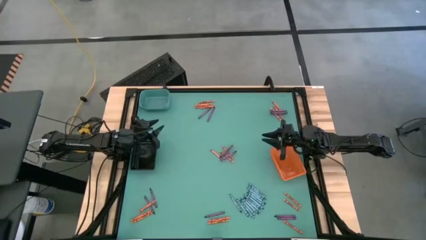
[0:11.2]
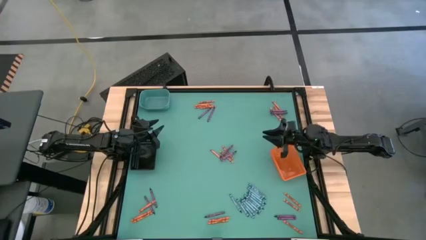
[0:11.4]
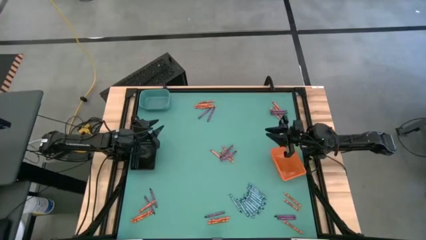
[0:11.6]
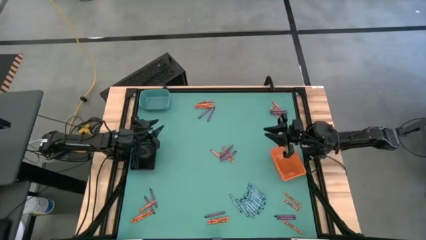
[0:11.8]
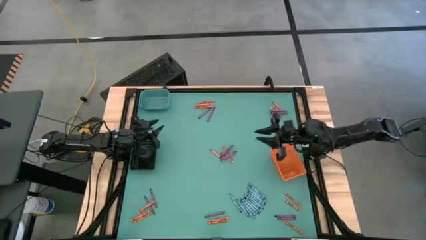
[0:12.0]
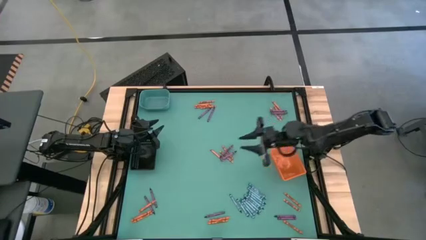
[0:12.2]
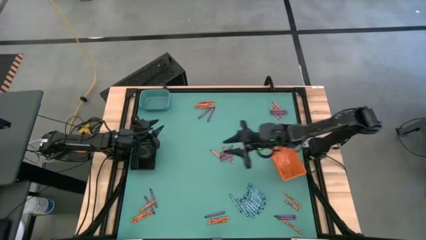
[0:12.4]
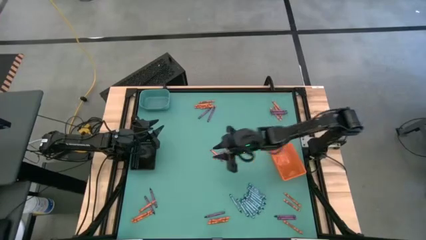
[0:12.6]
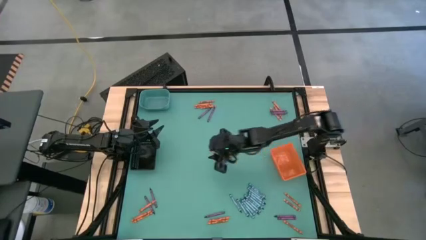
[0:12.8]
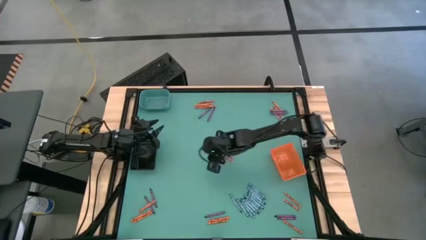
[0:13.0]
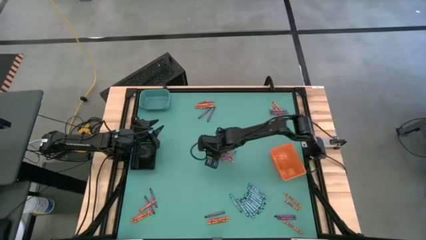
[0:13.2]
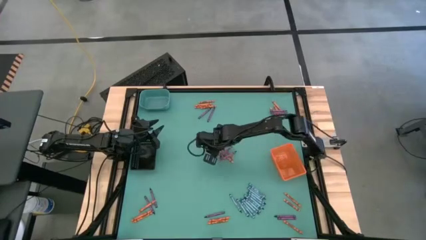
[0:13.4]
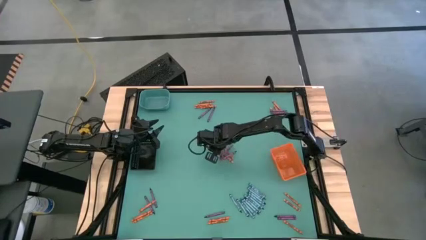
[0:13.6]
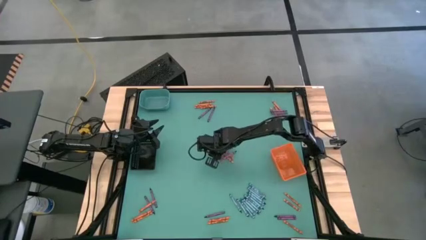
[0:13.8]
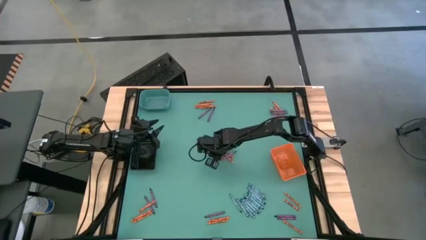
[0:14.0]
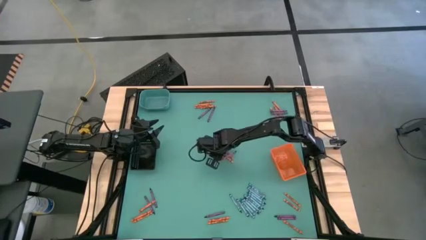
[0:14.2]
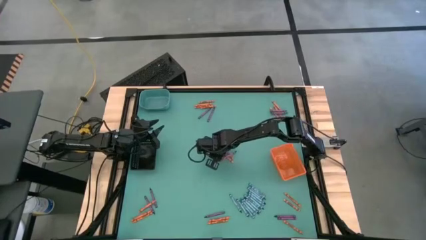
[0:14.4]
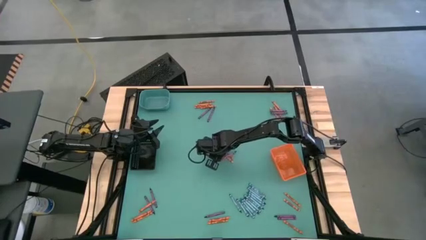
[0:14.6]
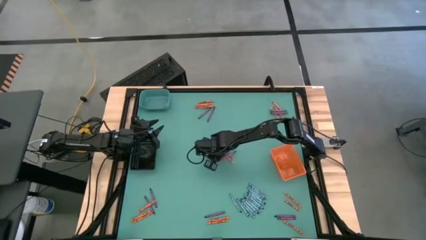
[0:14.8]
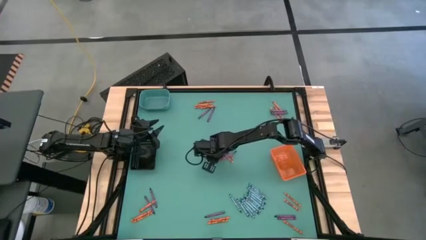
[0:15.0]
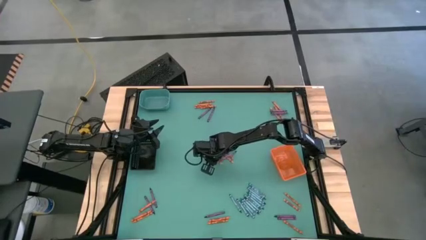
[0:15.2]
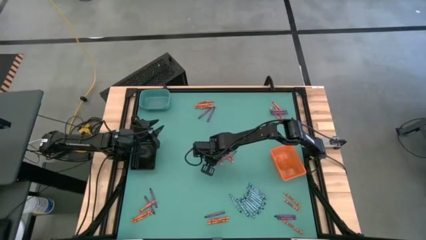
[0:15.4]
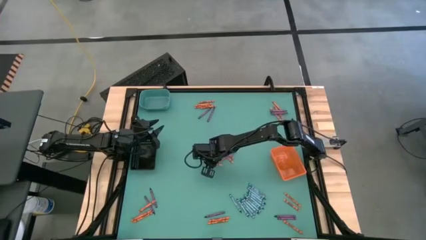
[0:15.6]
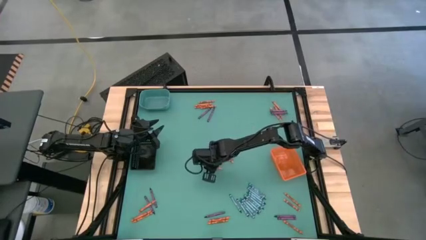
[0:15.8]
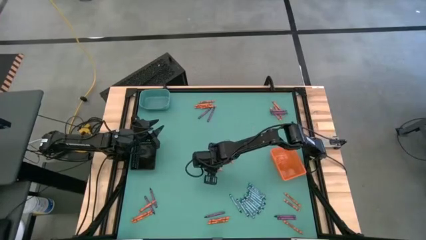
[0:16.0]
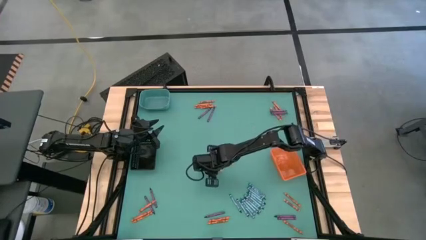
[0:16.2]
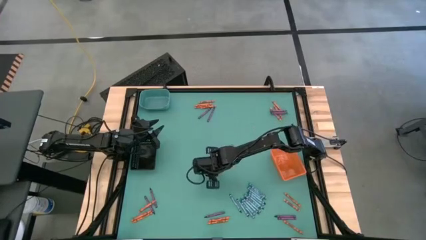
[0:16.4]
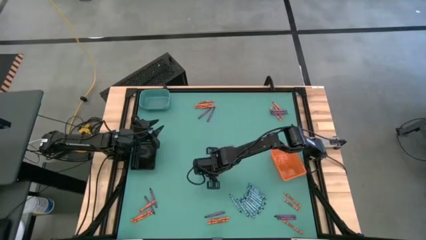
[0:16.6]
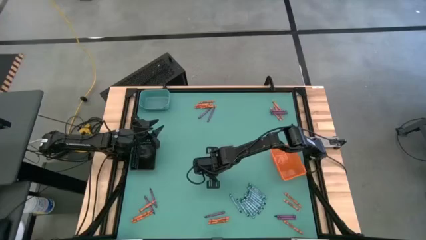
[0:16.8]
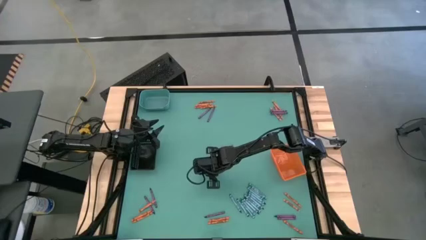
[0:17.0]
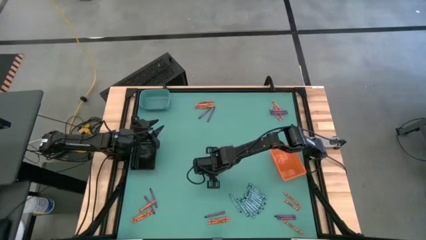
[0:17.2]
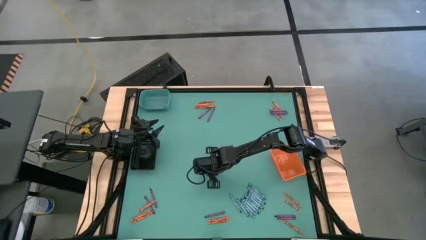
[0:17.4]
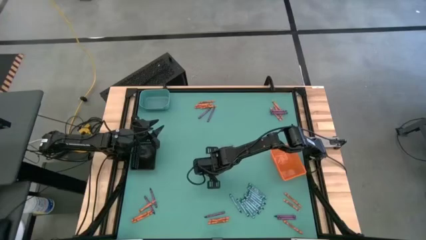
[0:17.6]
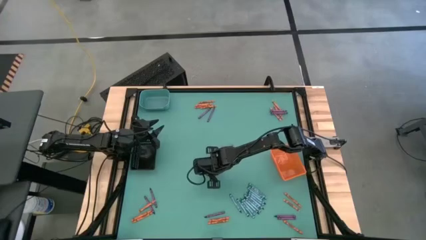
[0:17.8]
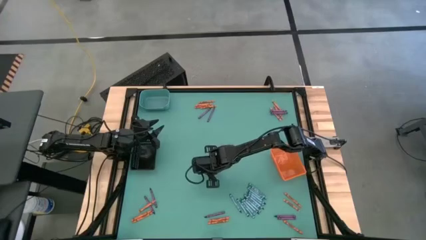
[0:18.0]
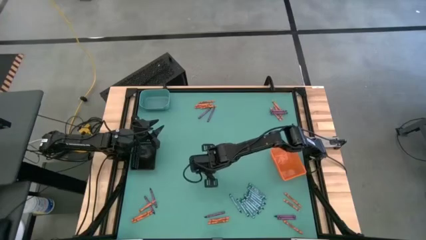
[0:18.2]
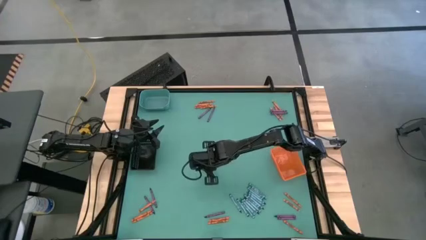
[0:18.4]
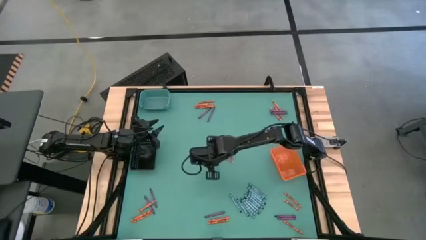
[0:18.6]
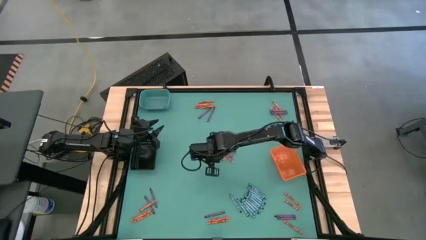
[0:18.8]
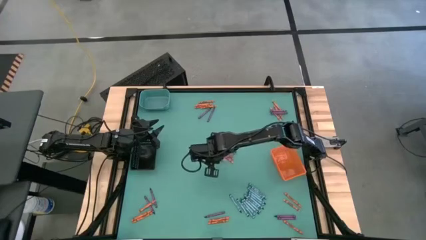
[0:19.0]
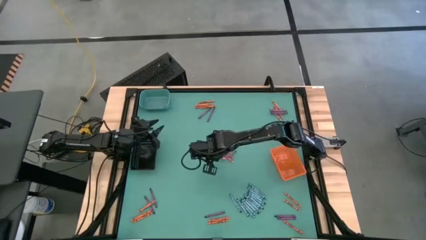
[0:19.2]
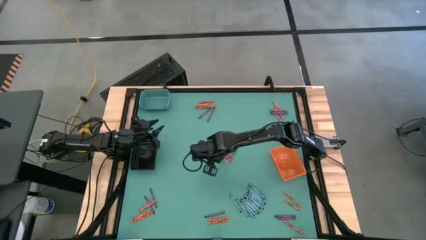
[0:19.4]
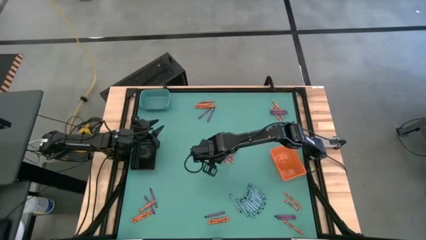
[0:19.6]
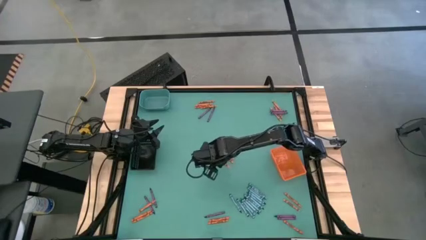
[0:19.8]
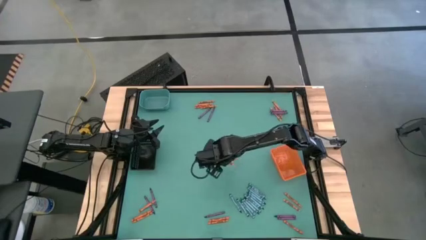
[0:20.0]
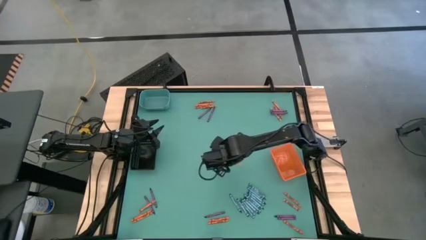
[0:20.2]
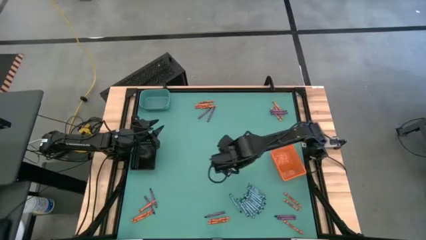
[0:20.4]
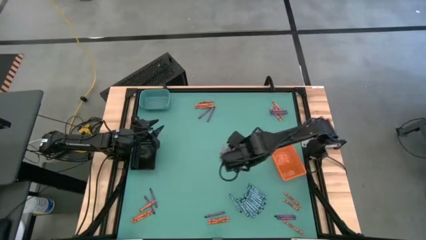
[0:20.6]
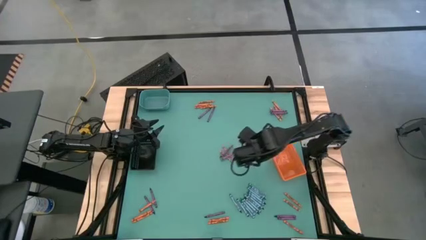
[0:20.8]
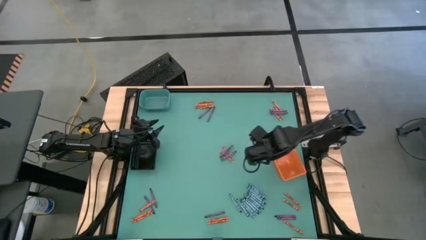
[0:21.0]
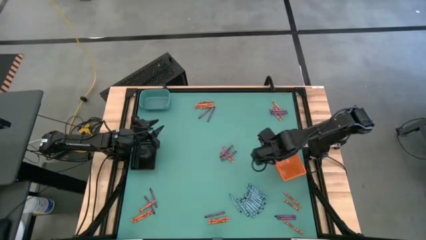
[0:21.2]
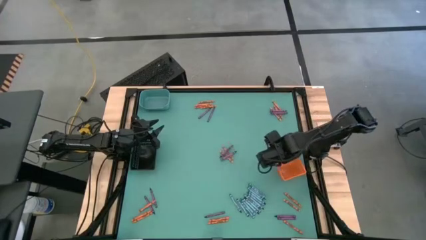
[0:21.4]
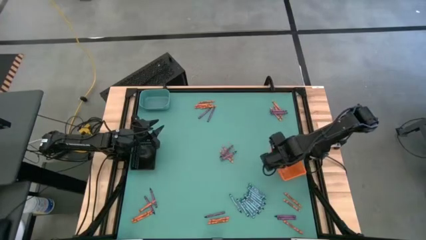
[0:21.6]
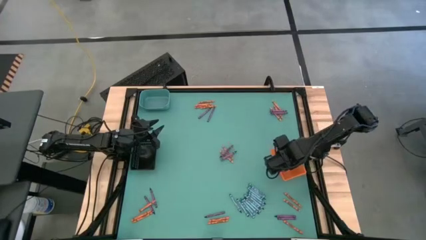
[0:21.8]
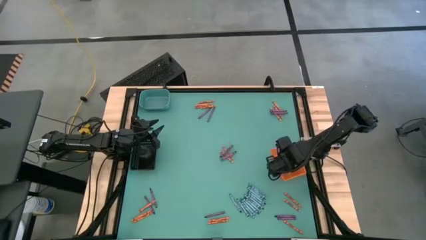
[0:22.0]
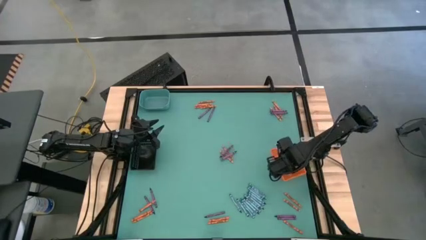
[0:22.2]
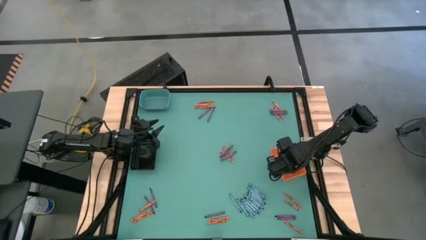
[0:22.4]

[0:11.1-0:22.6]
Task: Sort crayons
Put the orange crayon into the orange bin

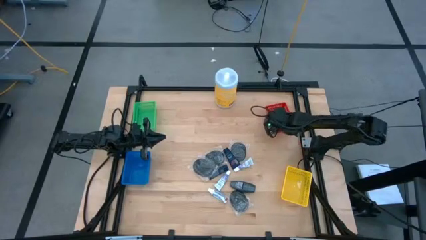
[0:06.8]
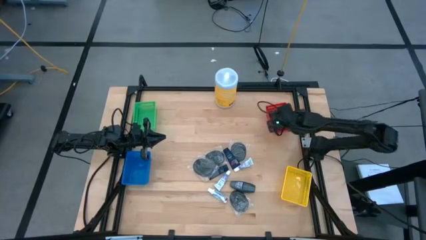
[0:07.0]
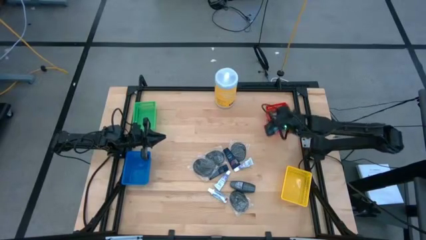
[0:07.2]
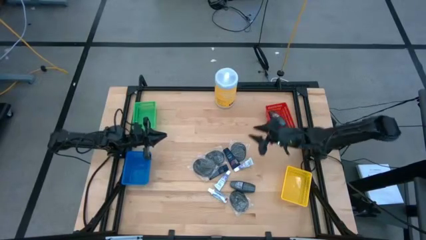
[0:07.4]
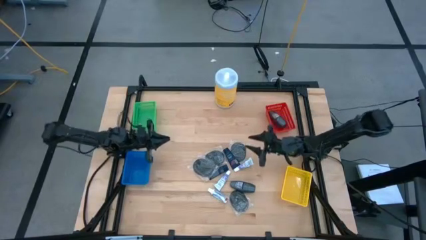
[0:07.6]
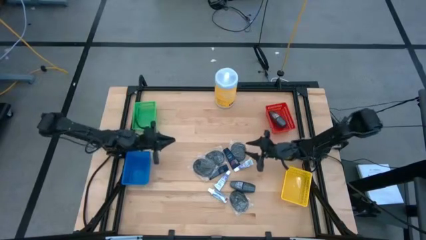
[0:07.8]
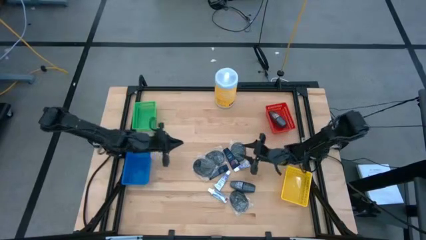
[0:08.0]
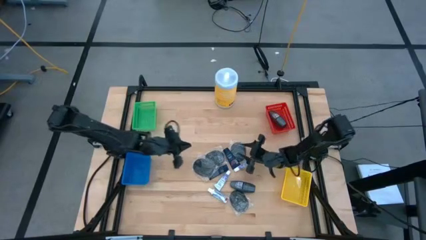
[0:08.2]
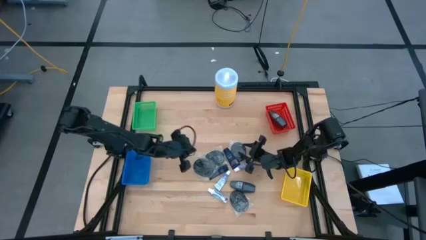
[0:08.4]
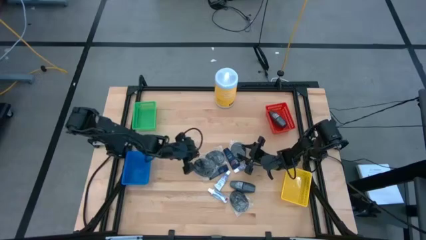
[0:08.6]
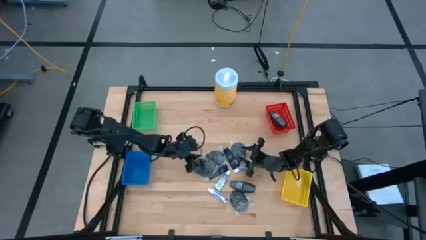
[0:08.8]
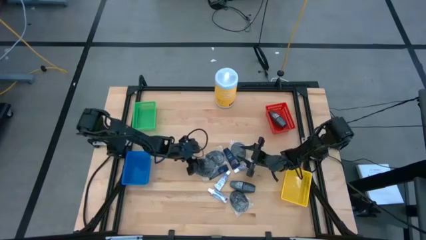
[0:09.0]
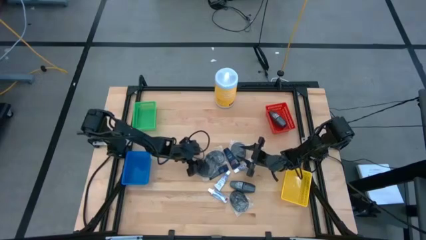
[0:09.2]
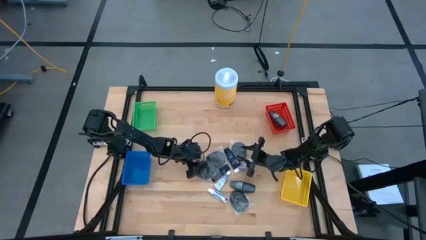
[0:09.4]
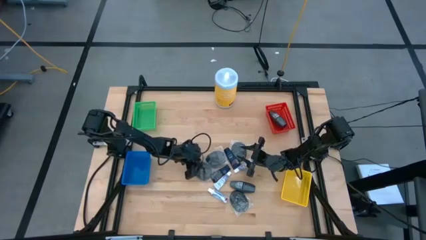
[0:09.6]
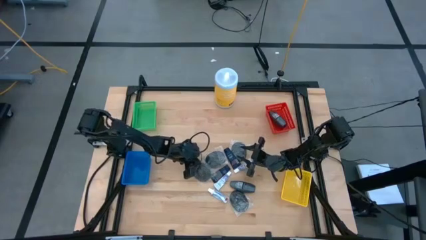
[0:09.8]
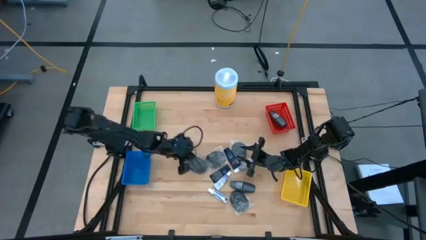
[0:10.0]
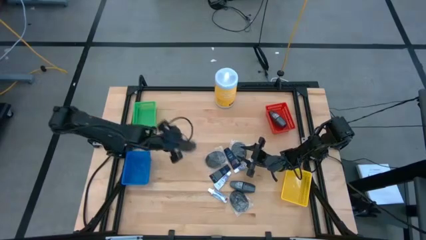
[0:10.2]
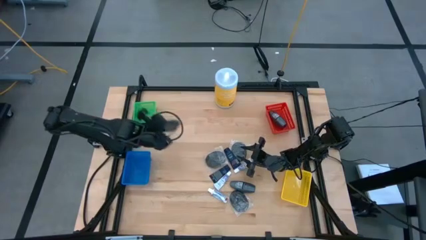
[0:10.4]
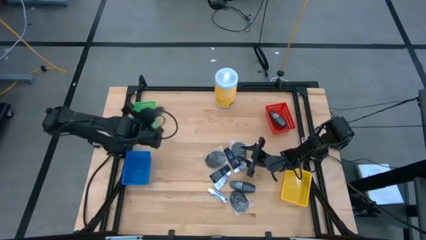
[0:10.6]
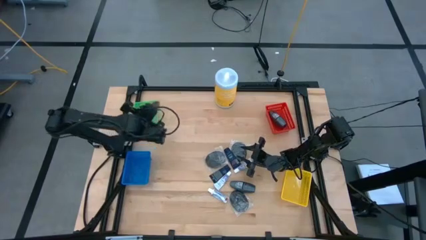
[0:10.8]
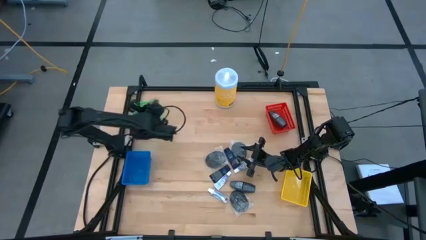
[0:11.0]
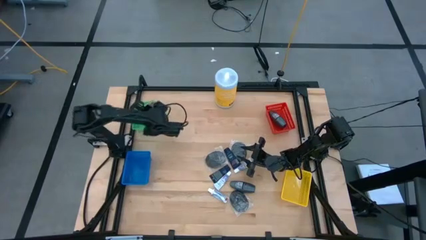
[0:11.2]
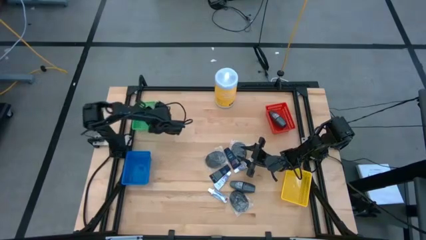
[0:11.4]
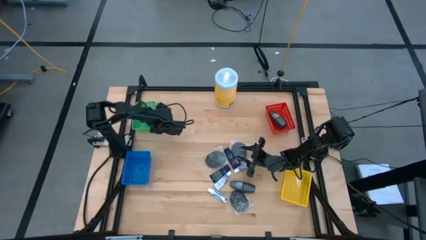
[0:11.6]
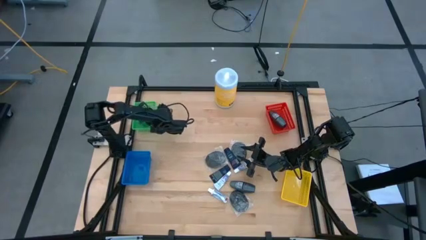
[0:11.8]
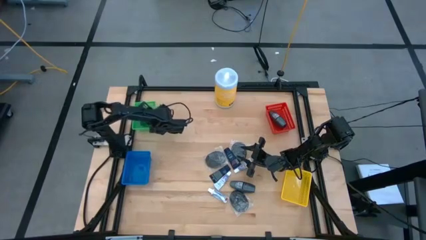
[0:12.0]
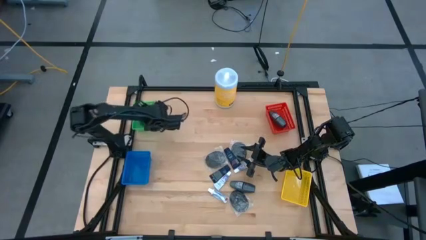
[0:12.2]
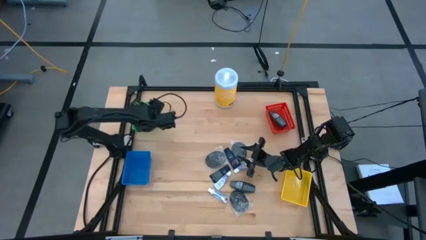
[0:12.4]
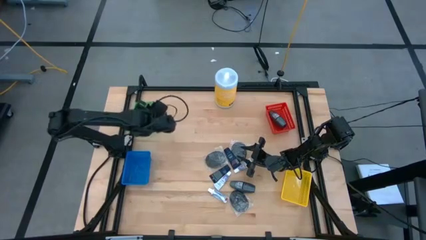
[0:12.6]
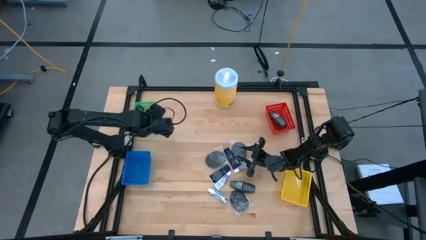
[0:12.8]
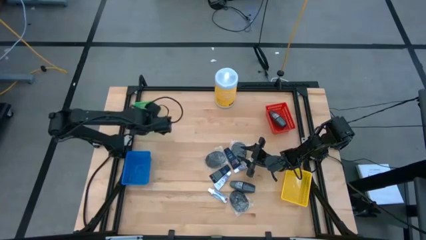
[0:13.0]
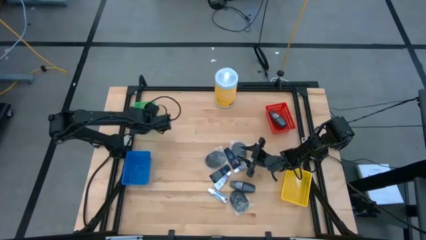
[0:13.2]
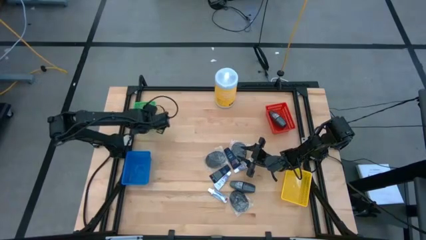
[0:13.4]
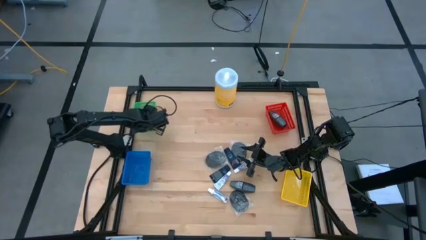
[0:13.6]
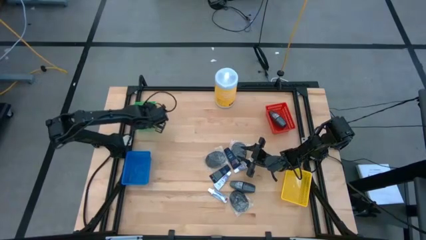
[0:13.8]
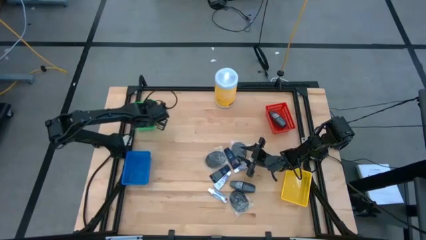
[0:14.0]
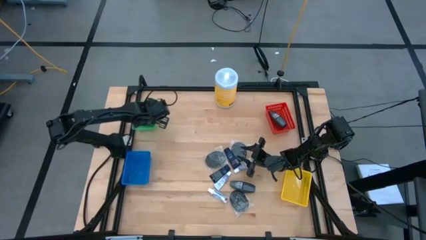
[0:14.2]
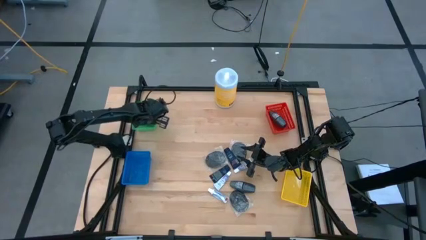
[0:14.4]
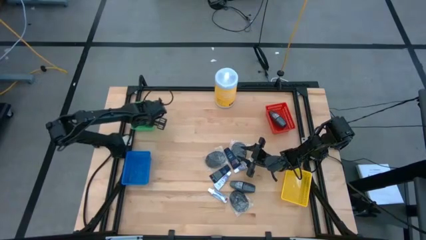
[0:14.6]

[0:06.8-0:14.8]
Task: Pick & Place Travel size toiletries
Put the hairbrush into the green bin
